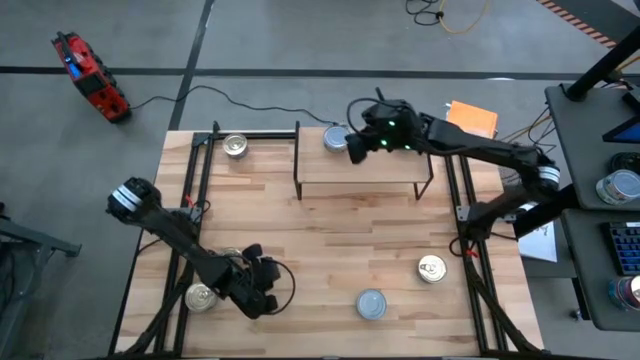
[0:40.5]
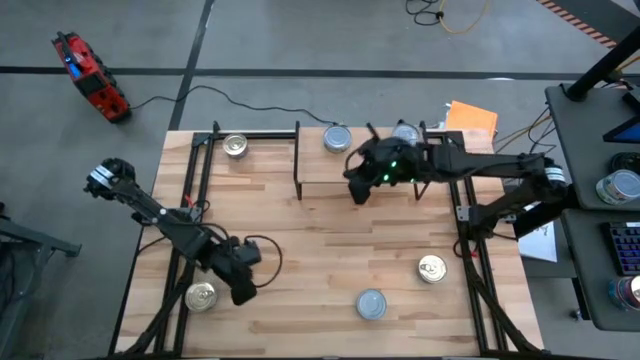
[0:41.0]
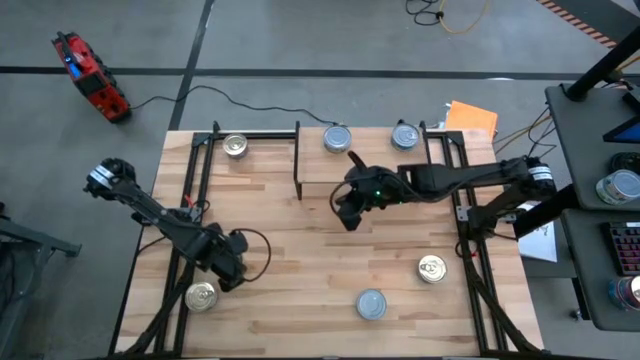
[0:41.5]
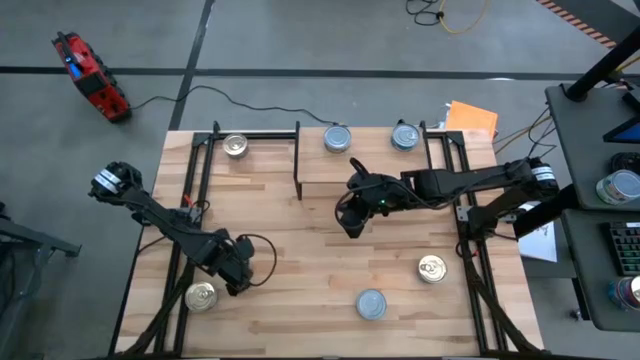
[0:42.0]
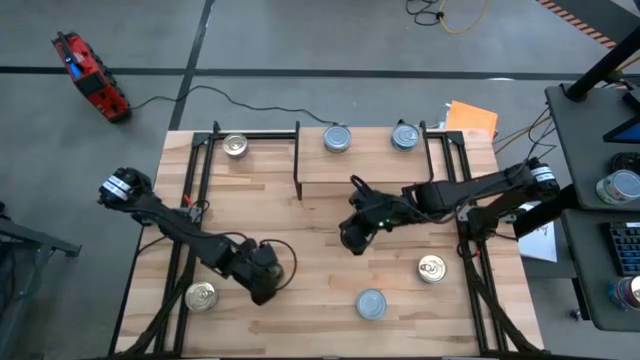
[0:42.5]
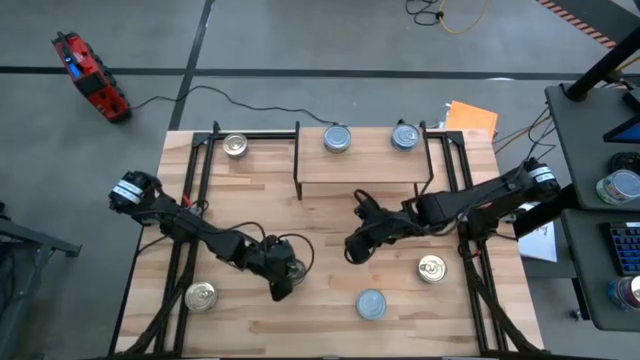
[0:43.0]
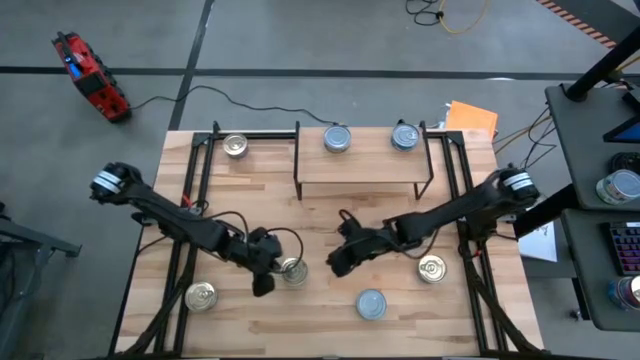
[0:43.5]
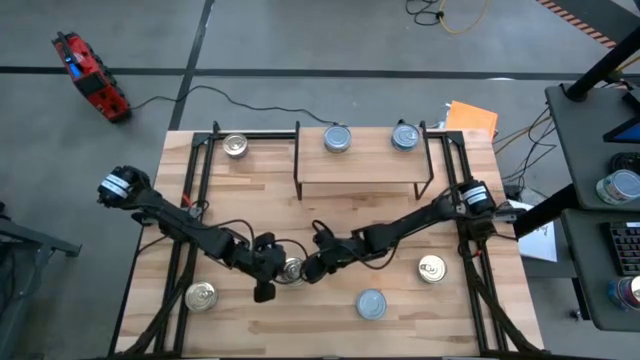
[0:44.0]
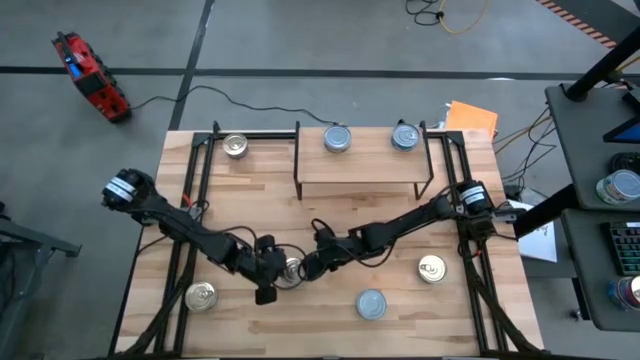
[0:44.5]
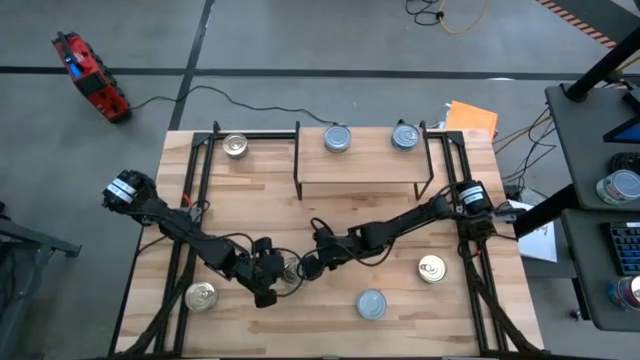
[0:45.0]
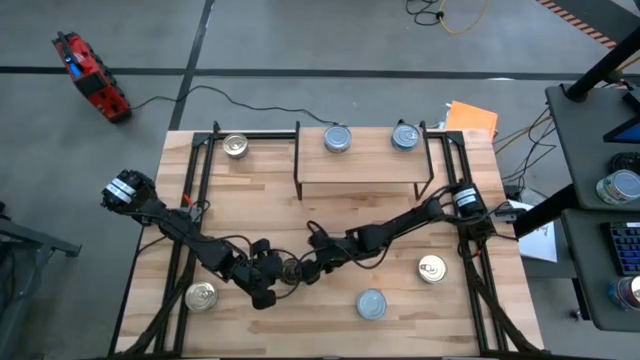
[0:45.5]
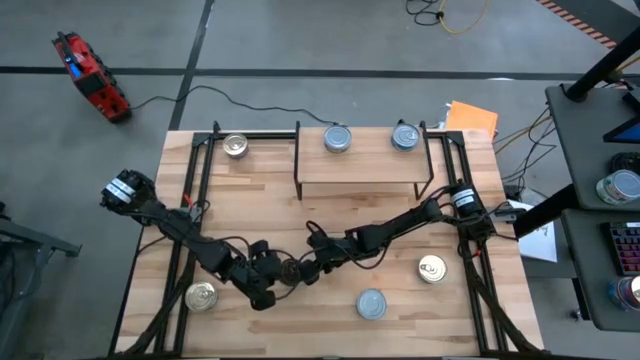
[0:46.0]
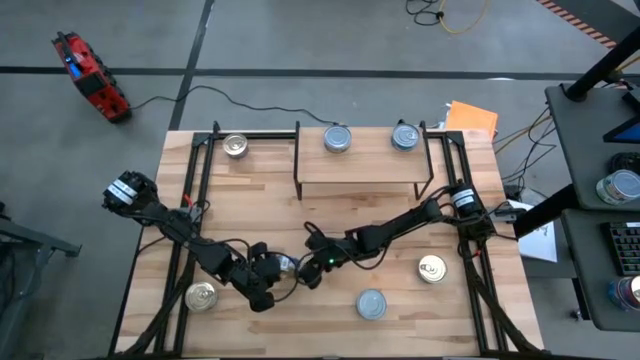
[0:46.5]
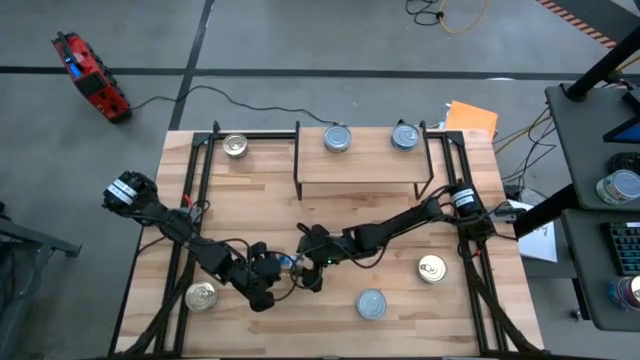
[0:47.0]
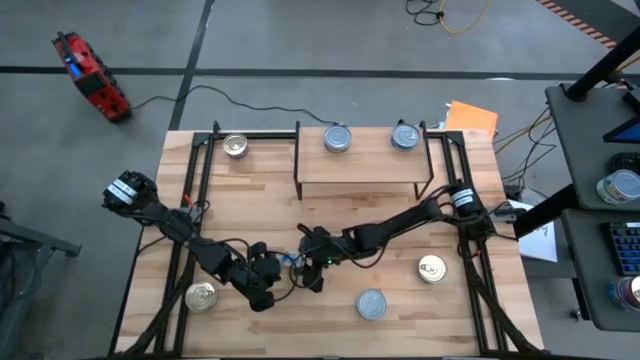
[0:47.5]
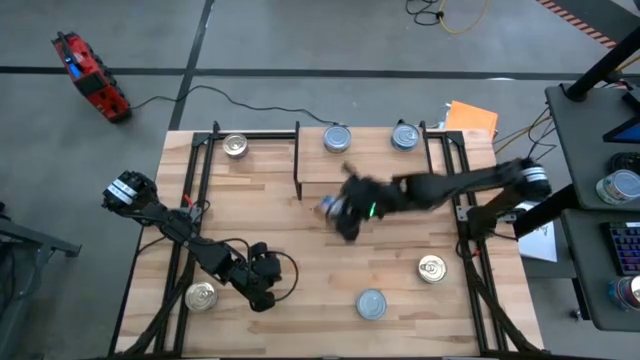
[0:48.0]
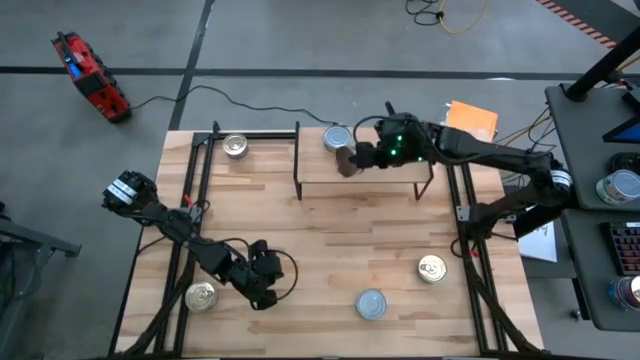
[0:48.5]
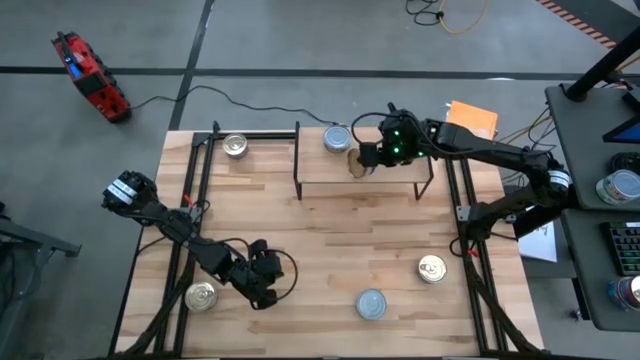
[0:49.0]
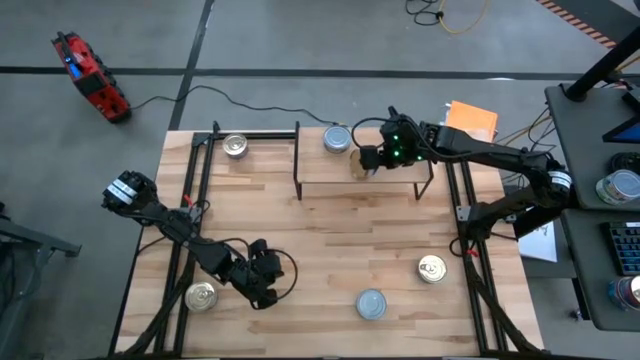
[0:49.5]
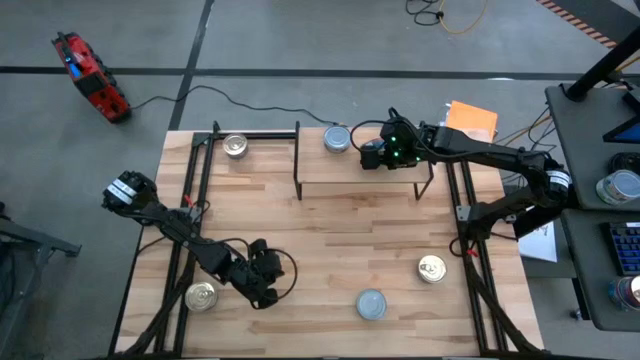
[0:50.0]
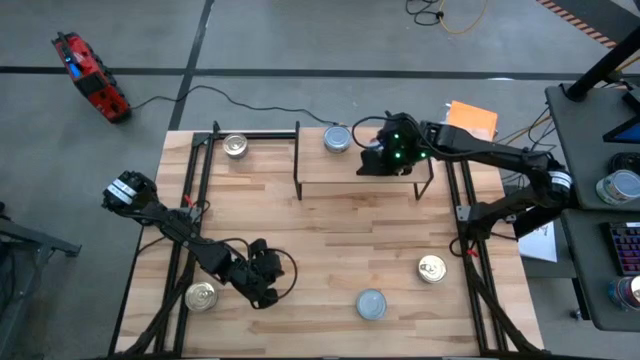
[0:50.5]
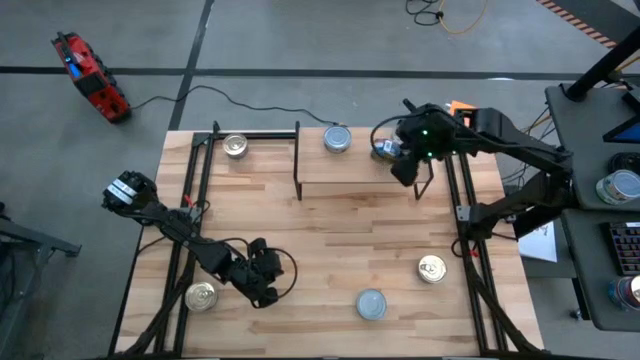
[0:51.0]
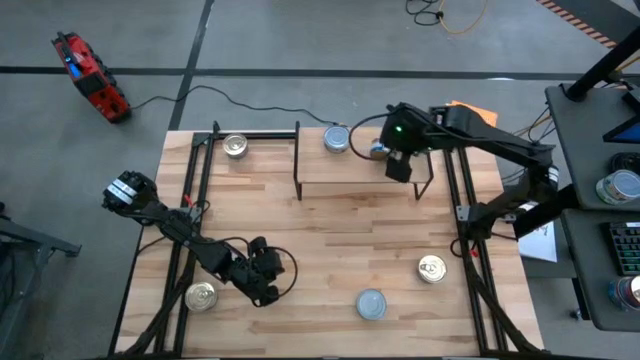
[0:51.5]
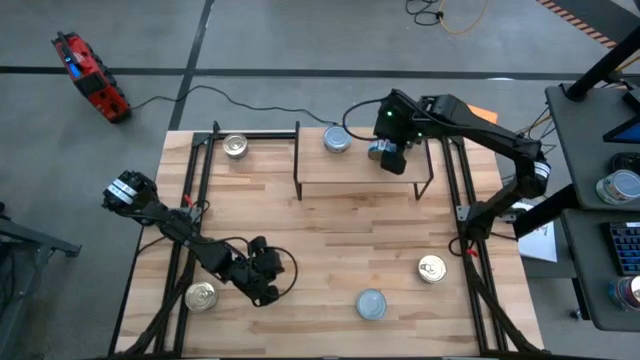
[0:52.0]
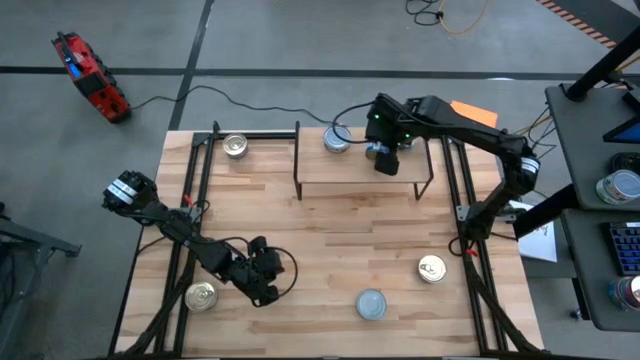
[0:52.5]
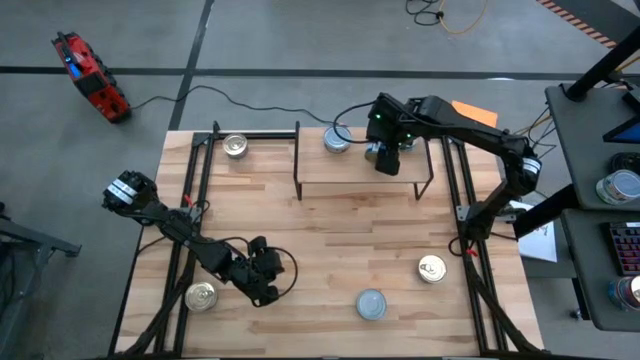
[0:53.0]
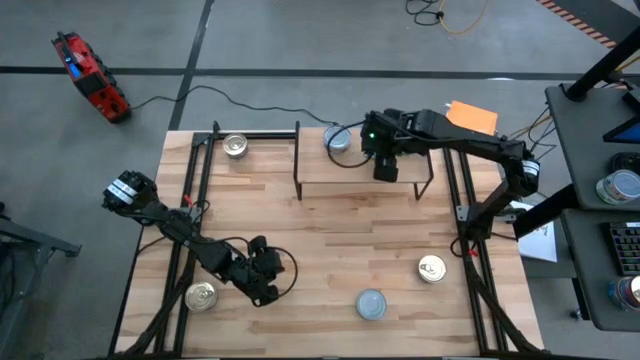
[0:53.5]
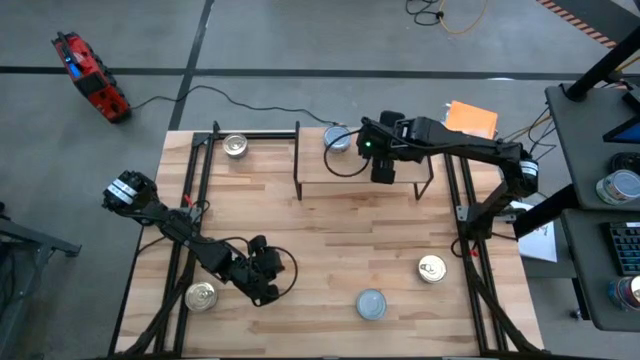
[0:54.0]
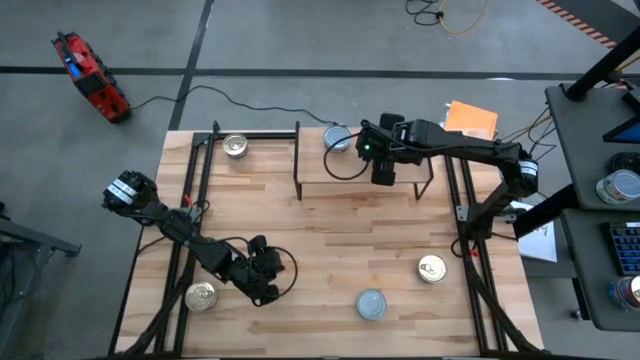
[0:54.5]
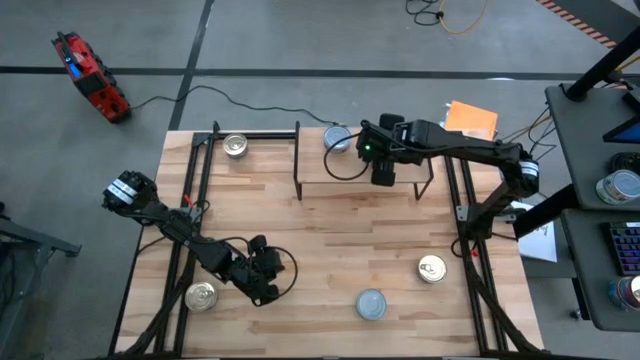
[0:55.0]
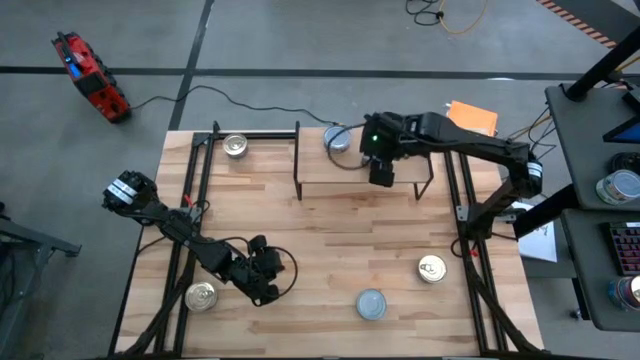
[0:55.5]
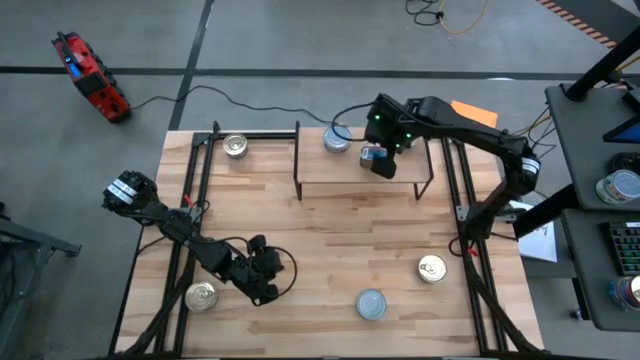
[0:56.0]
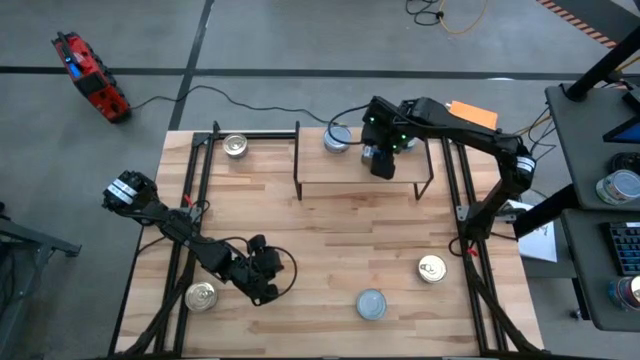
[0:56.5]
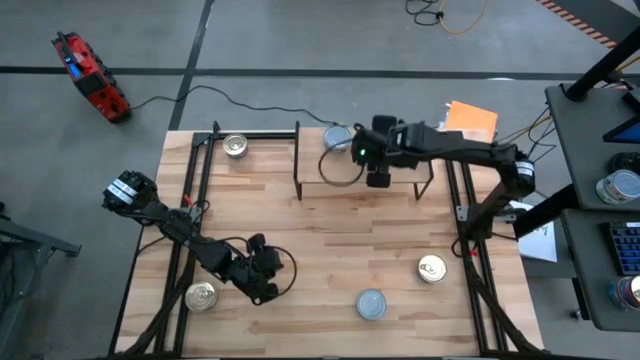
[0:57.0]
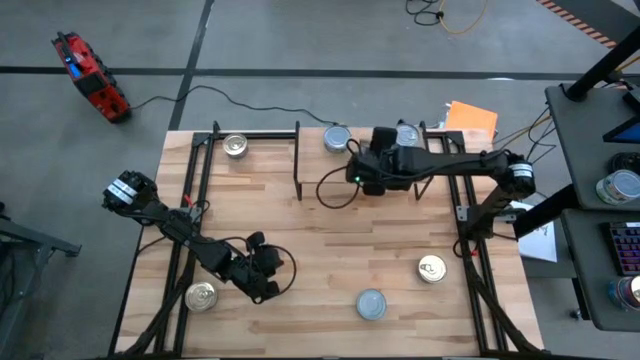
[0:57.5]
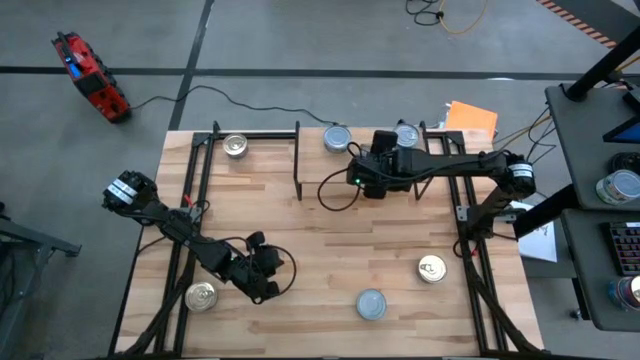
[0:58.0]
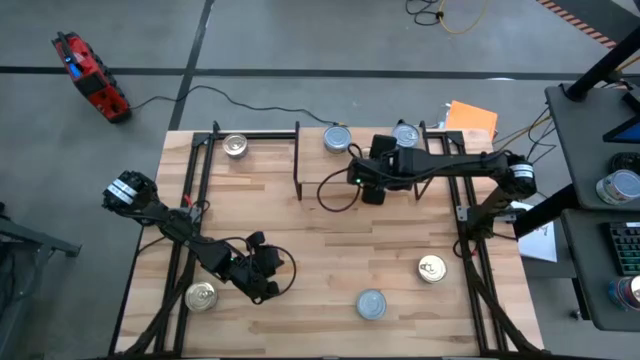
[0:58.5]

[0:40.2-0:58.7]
Task: Stack canned seafood by type on shelf
Put the blue-pink tuna can on the shelf

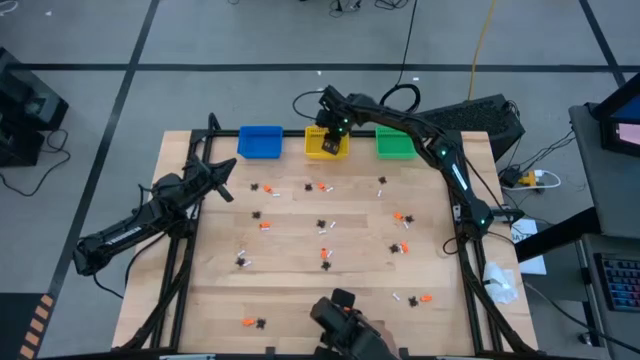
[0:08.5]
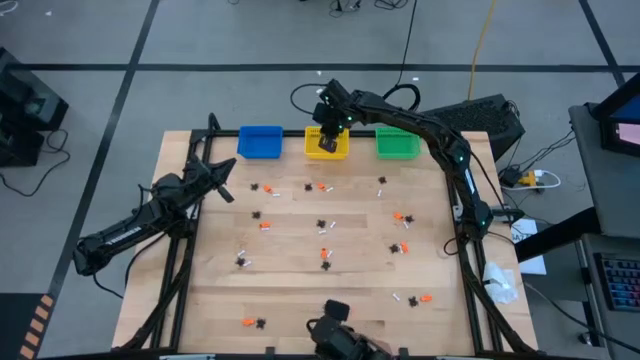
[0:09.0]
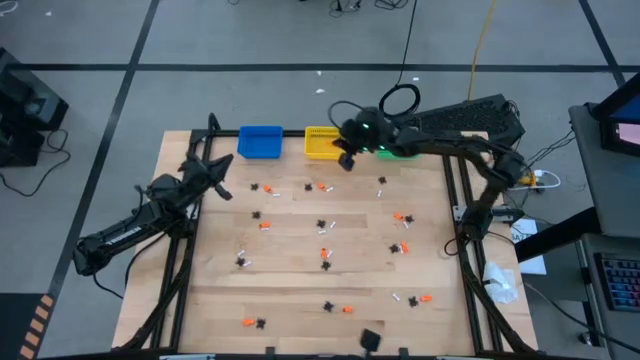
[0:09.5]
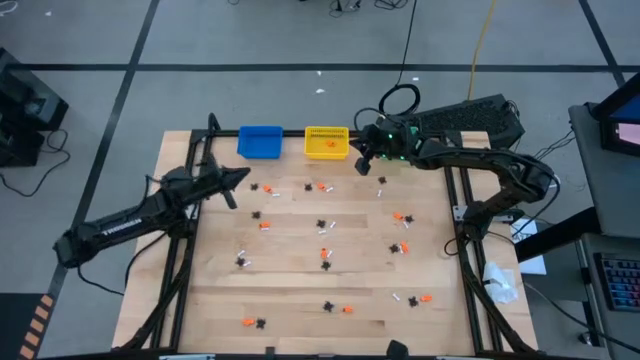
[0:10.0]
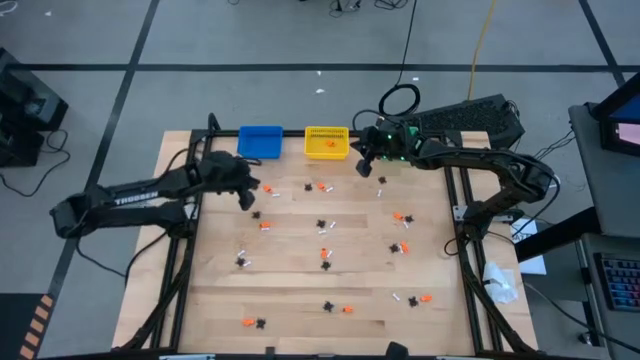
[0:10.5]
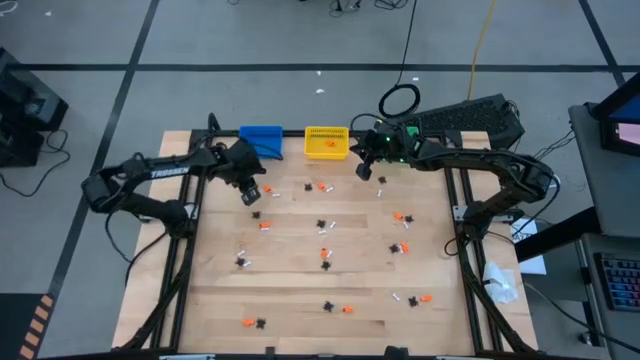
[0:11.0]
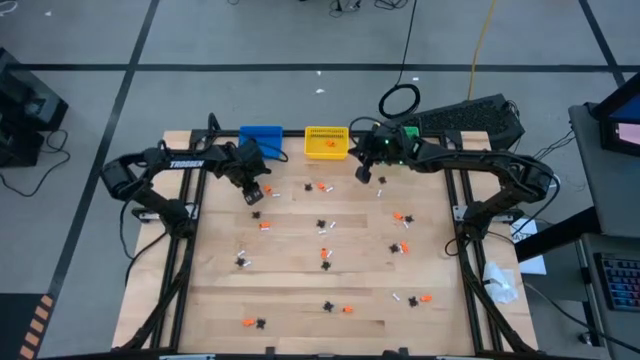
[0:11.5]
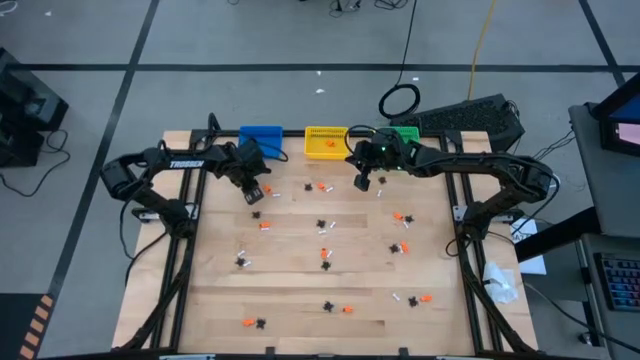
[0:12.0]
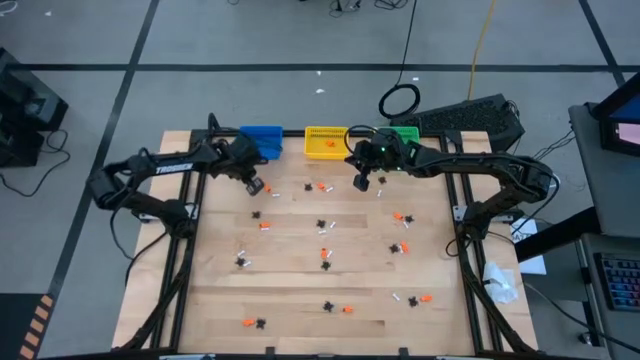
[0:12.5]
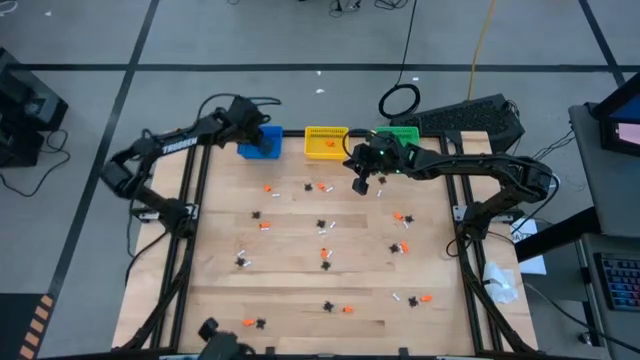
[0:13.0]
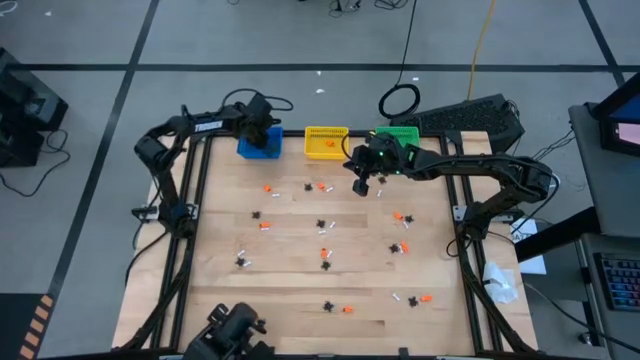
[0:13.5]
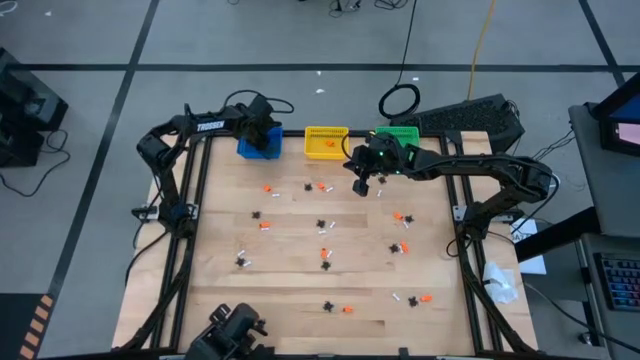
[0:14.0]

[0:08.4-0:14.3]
Task: Sort Halloween decoration
Put the black spider toy into the blue bin
